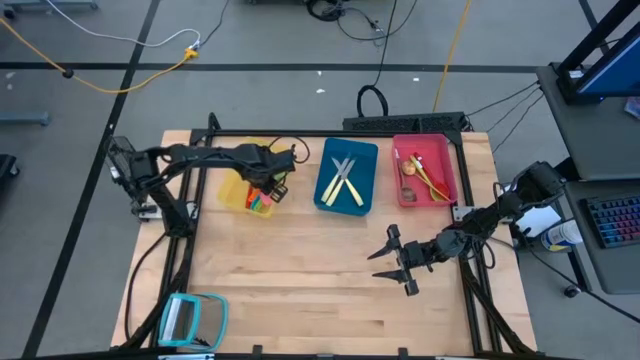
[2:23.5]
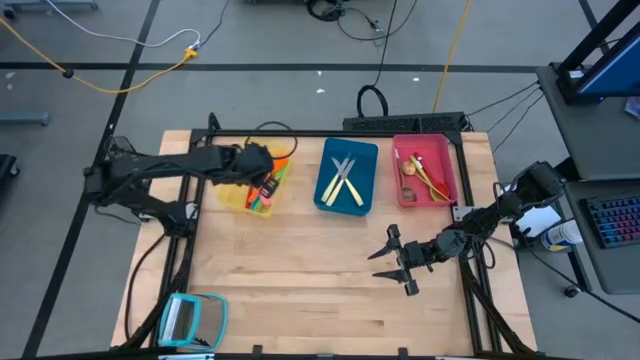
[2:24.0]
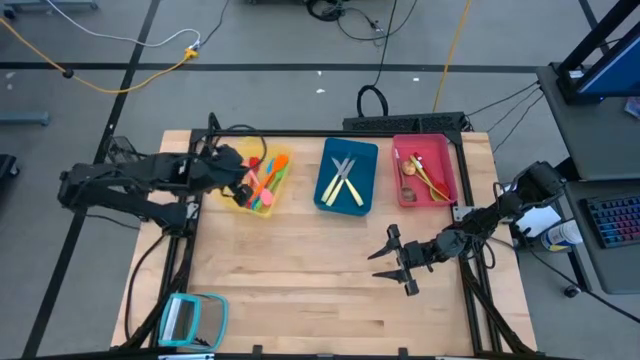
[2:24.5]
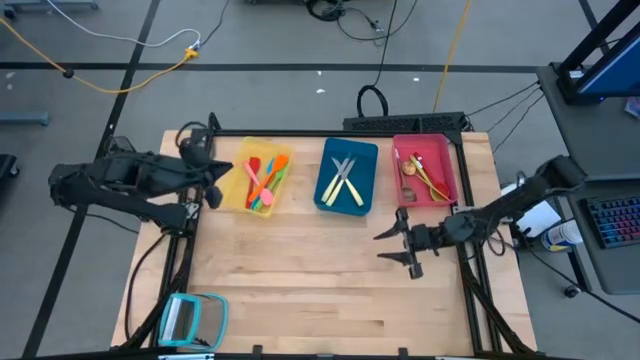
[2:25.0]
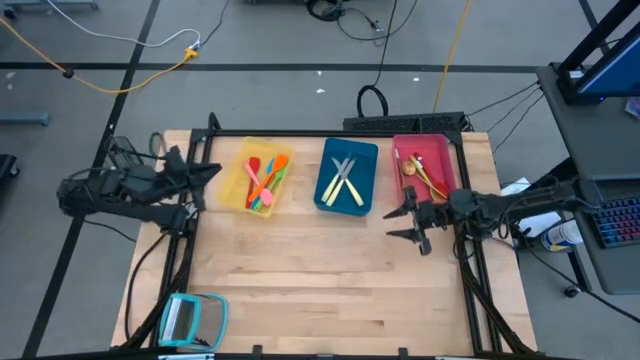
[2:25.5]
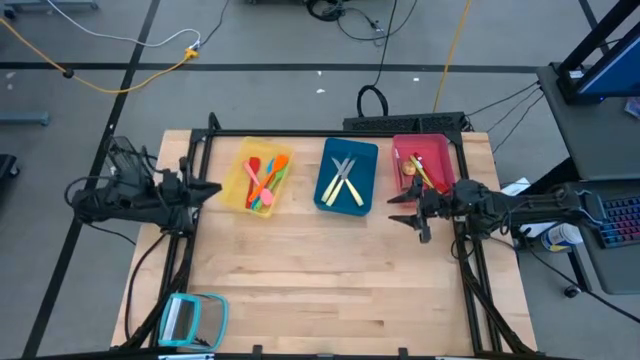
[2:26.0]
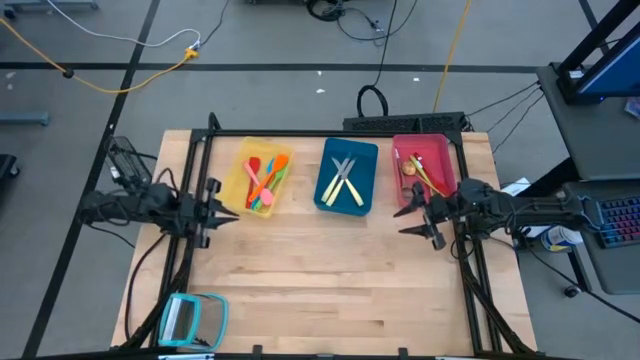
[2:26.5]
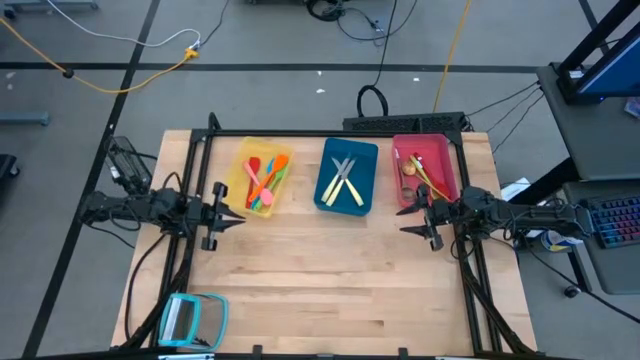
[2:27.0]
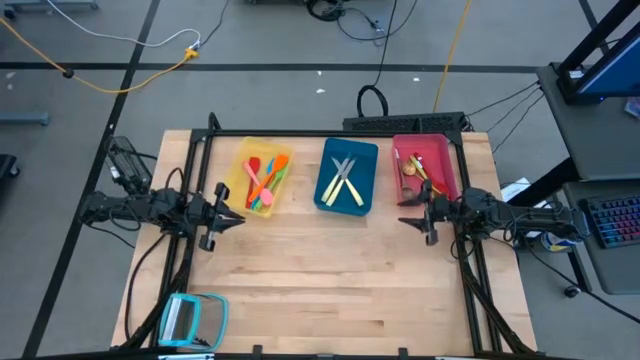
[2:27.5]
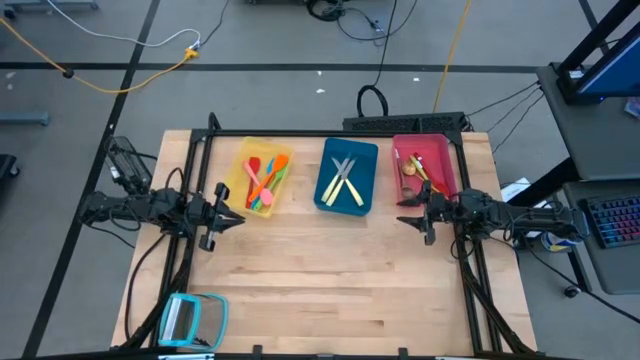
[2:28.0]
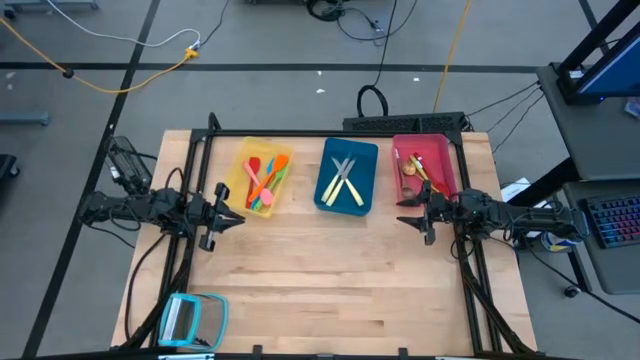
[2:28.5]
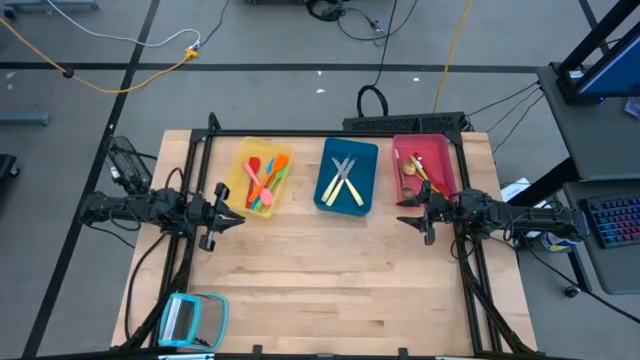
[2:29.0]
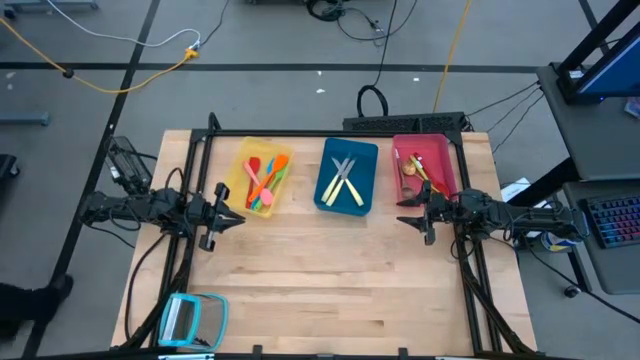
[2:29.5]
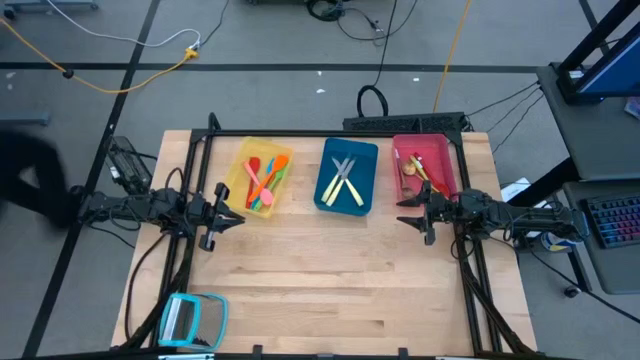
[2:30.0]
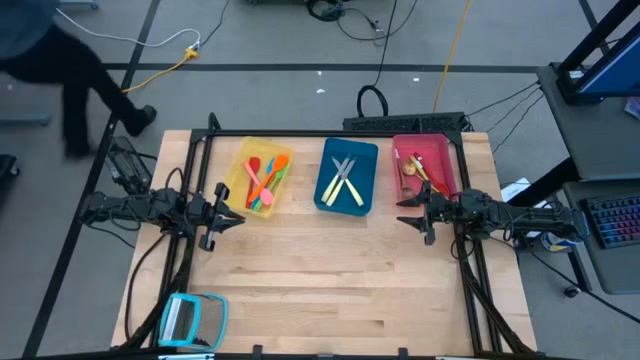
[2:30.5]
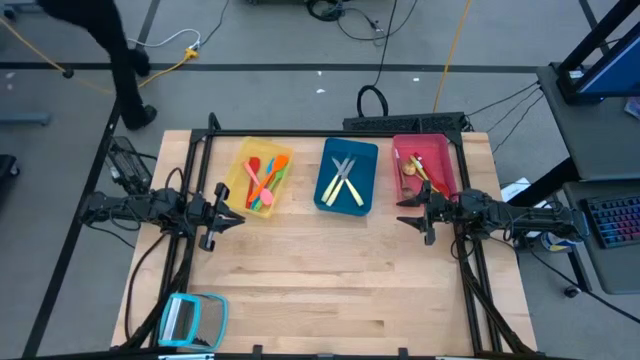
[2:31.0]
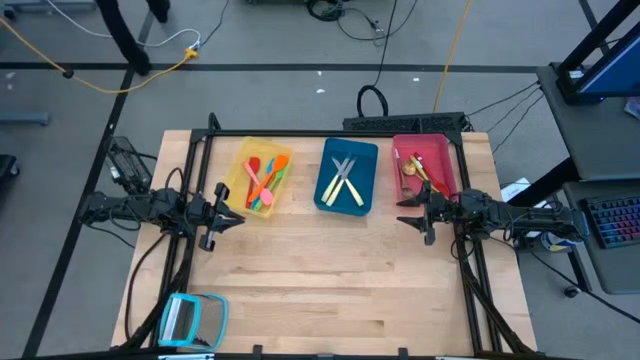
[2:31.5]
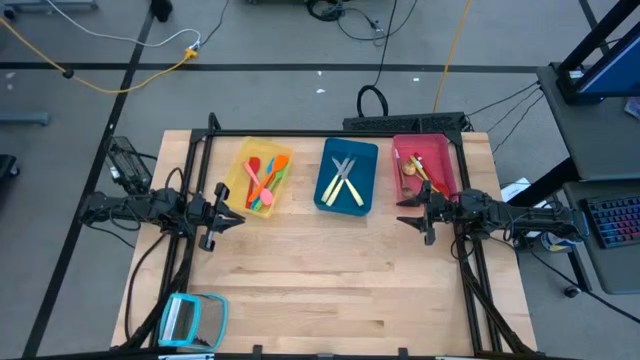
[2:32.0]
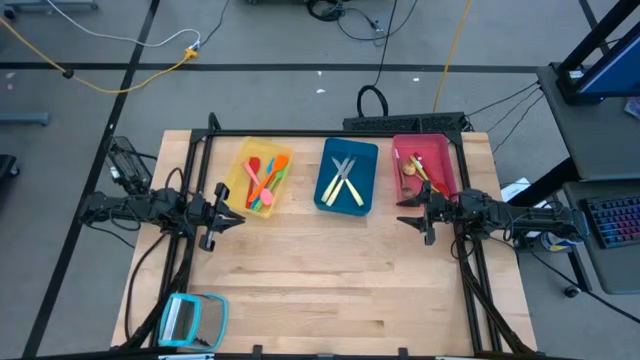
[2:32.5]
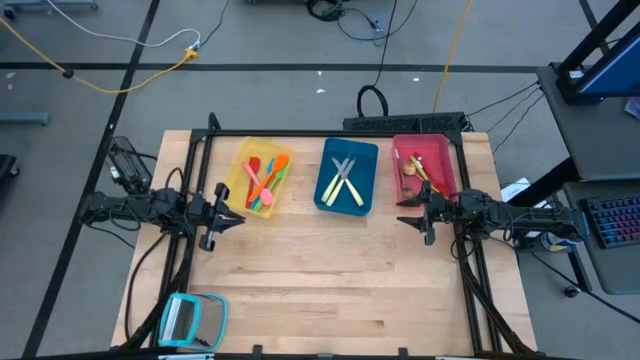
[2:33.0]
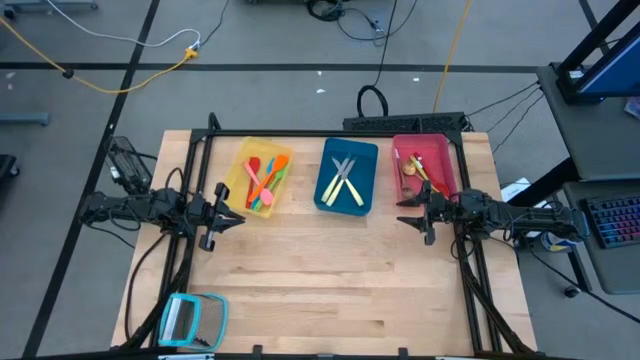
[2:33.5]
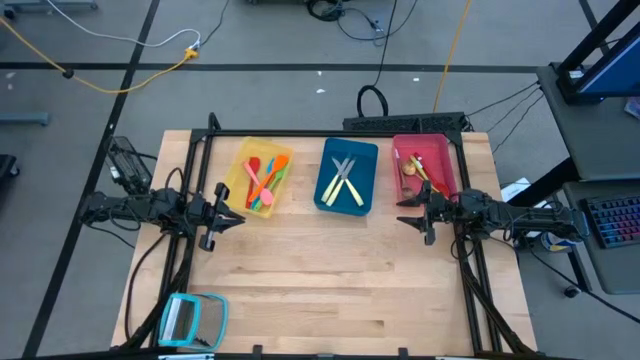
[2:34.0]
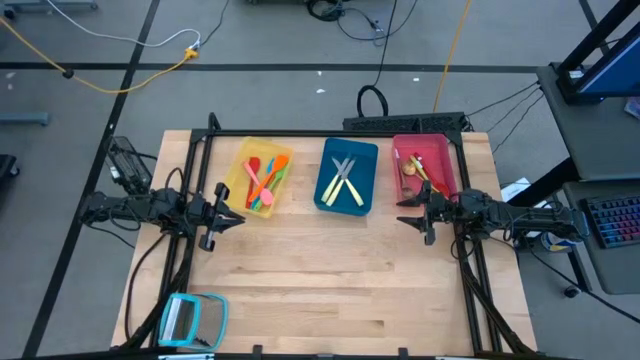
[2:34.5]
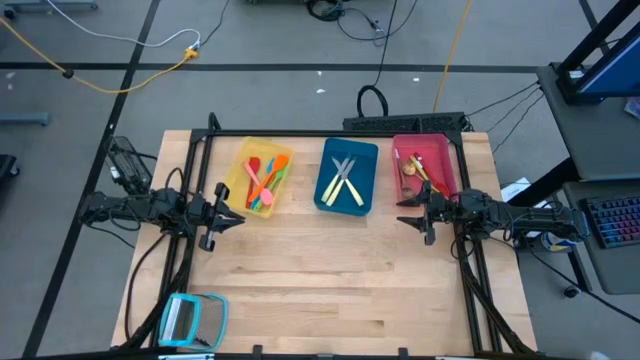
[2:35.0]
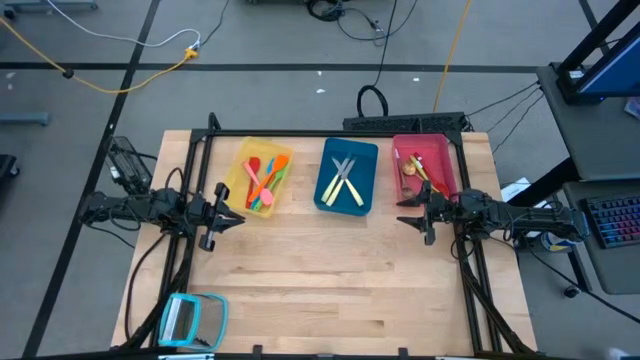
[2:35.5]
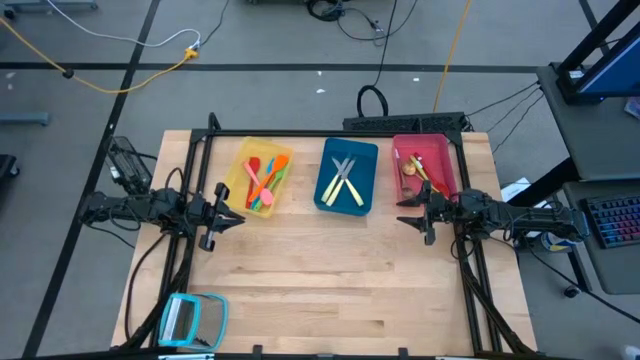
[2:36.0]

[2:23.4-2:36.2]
Task: Pick & Place Kitchen Items
Return to Home Position

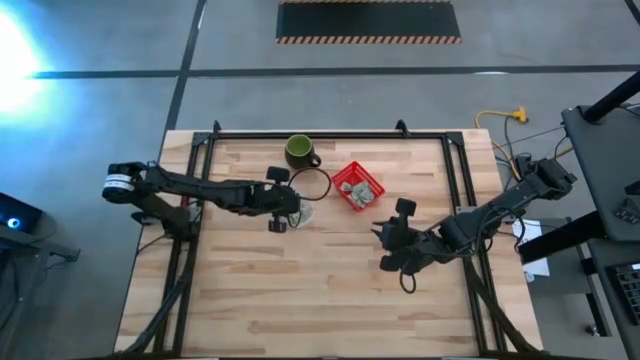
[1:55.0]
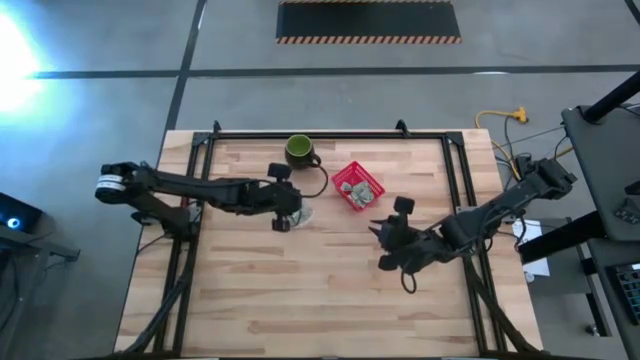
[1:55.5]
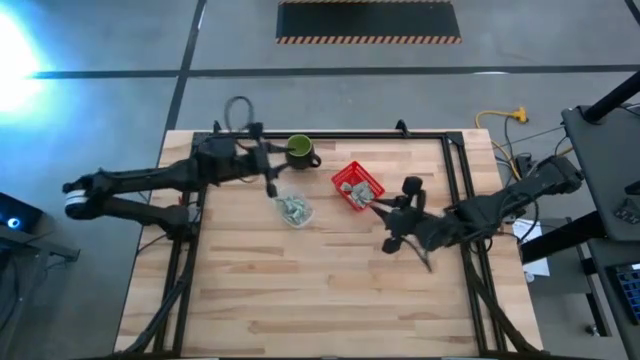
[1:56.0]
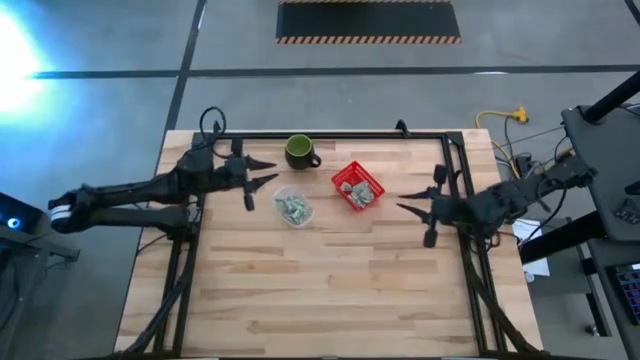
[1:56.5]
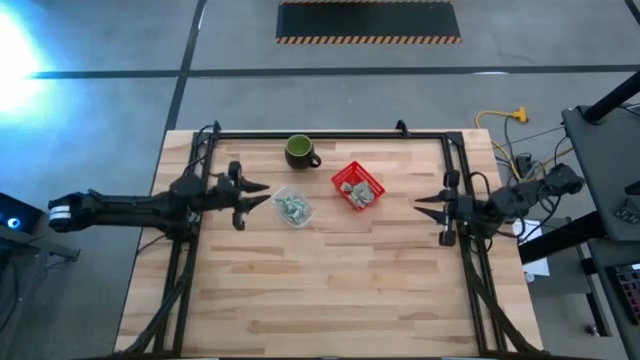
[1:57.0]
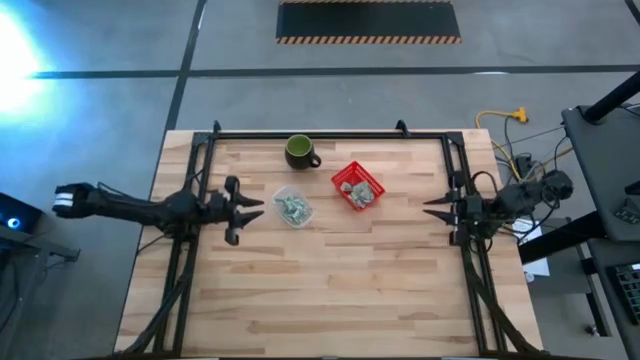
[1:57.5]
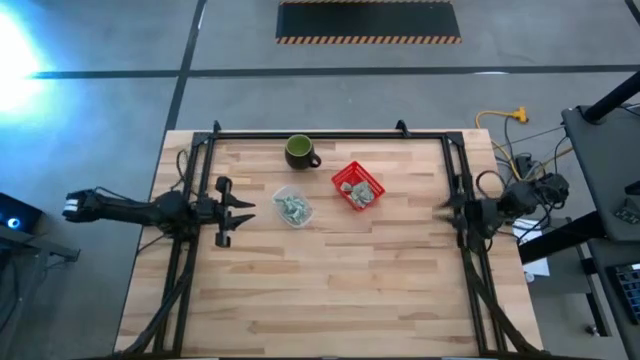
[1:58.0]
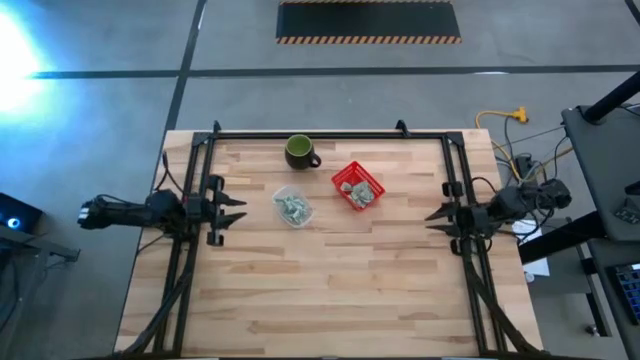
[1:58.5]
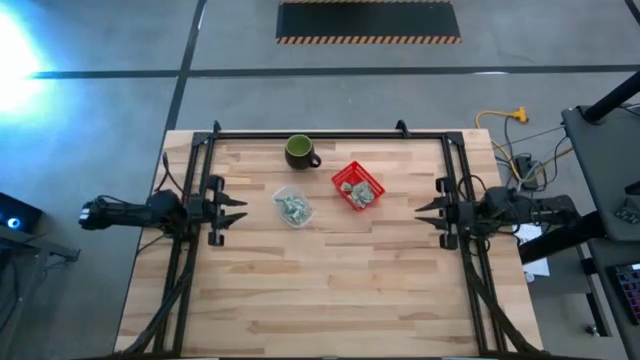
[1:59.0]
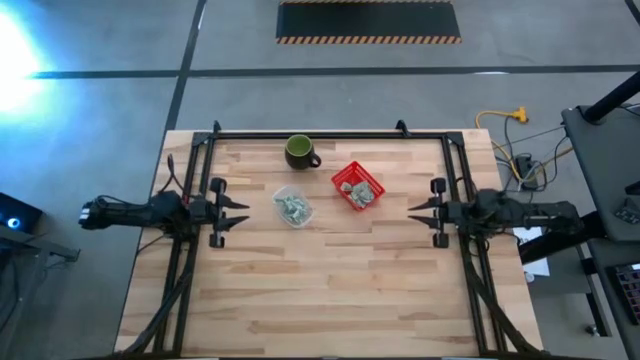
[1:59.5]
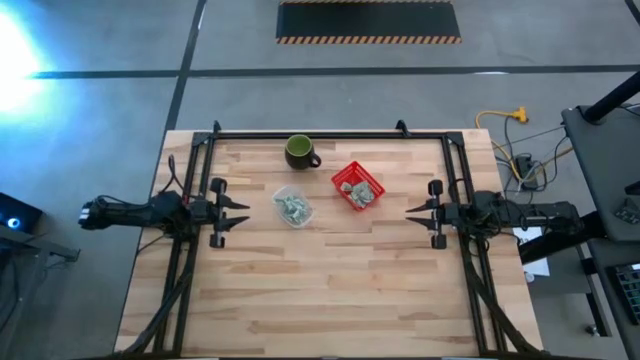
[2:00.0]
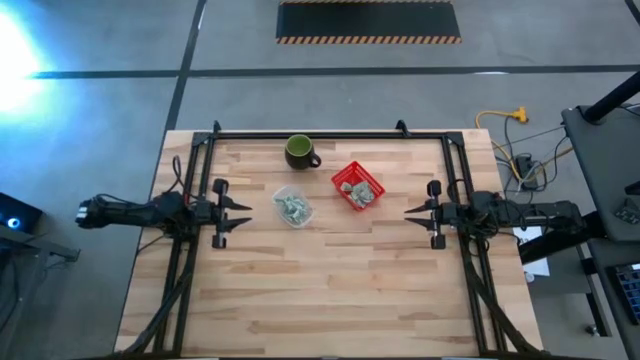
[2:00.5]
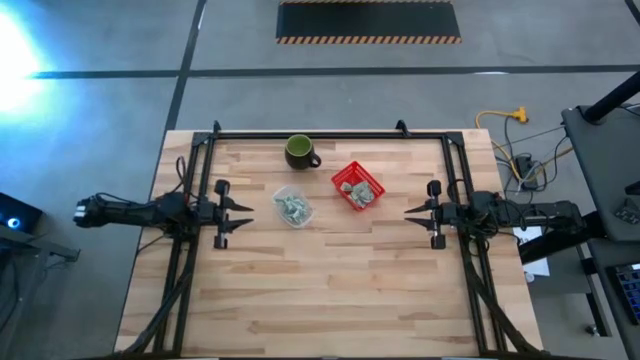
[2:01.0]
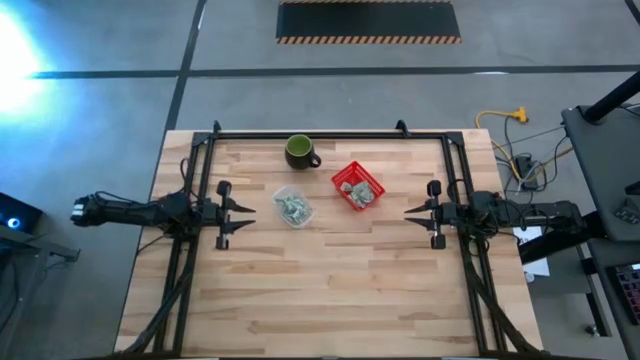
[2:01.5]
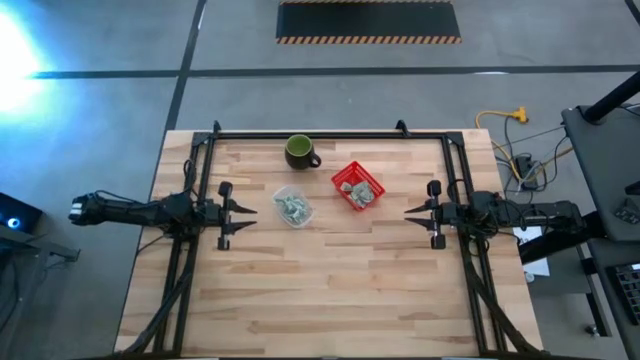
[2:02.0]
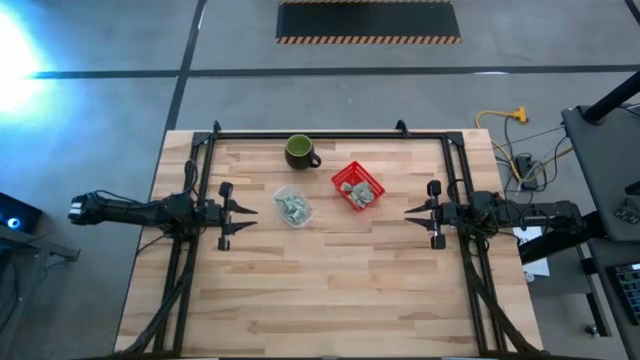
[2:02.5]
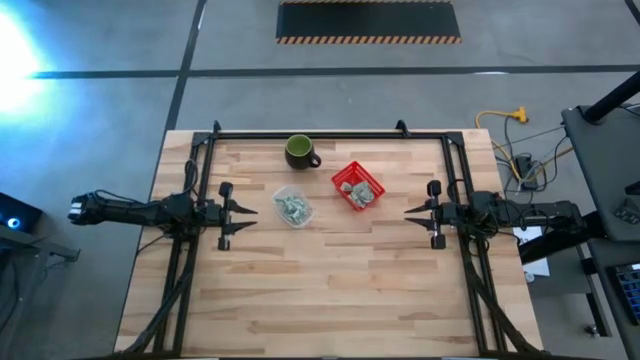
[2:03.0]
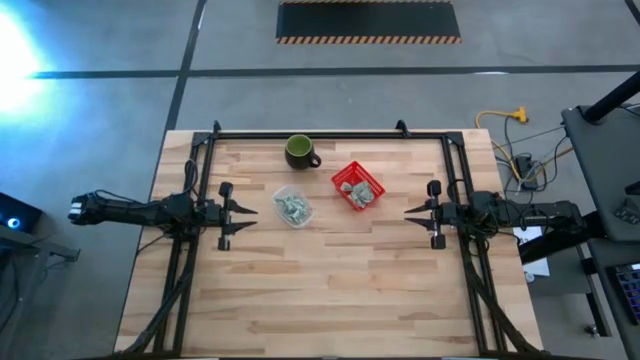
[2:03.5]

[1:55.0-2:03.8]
Task: Pick and place items into bin
Return to Home Position
